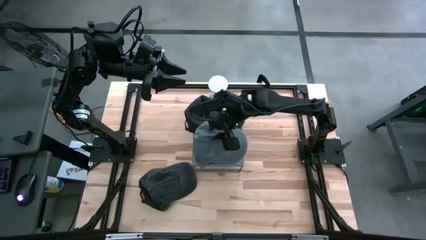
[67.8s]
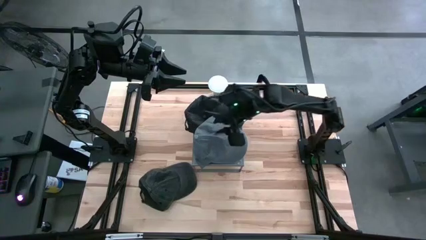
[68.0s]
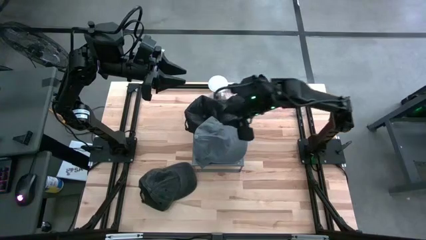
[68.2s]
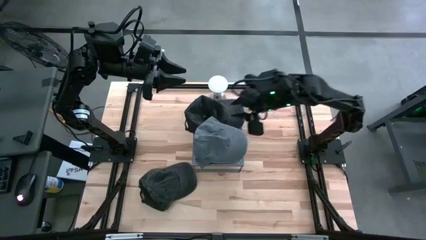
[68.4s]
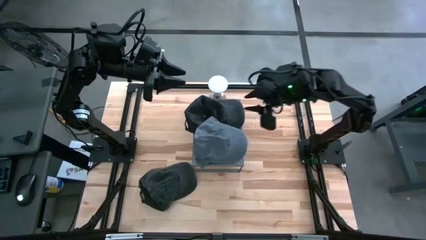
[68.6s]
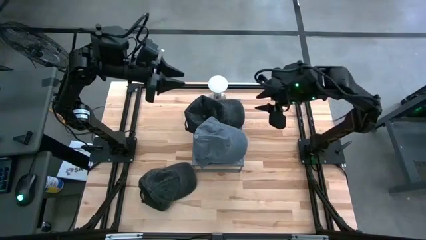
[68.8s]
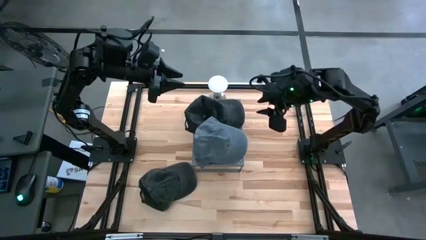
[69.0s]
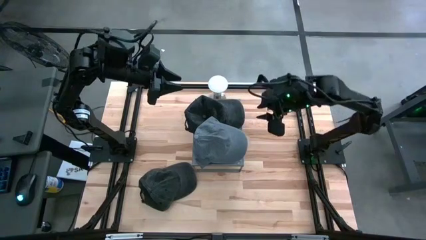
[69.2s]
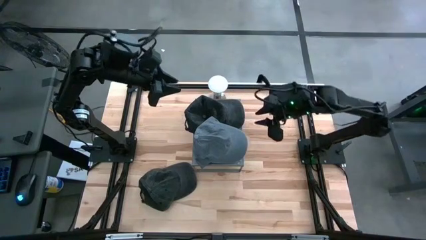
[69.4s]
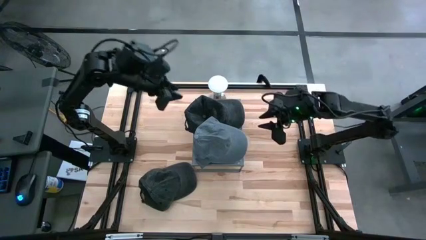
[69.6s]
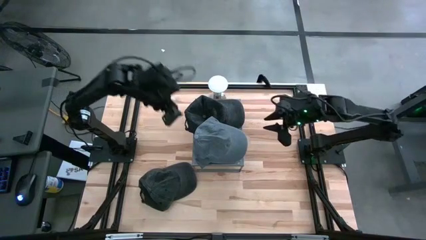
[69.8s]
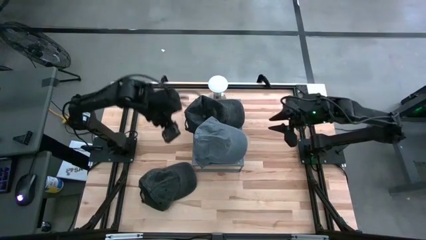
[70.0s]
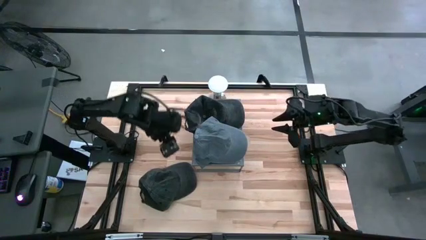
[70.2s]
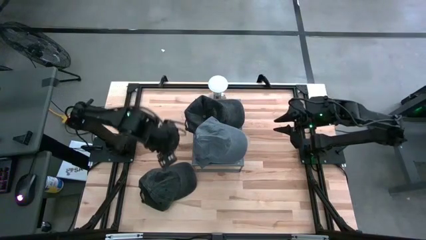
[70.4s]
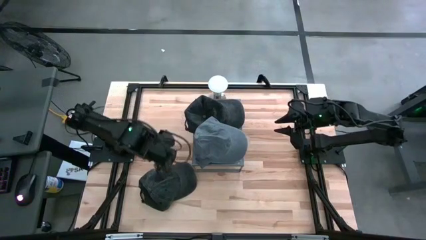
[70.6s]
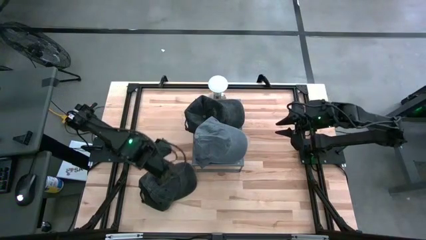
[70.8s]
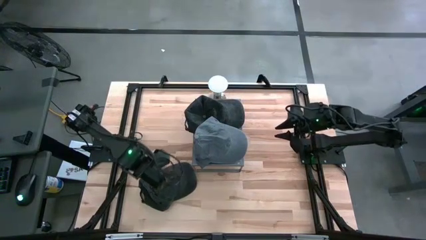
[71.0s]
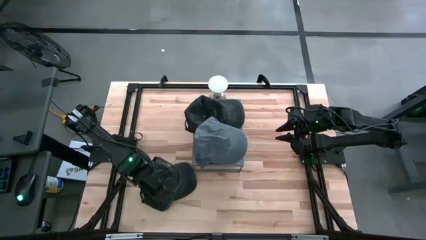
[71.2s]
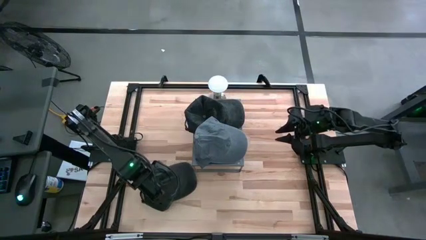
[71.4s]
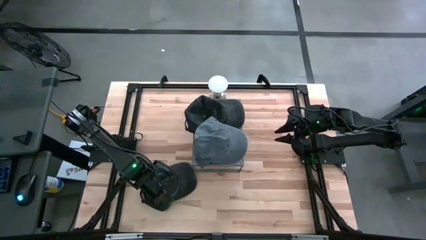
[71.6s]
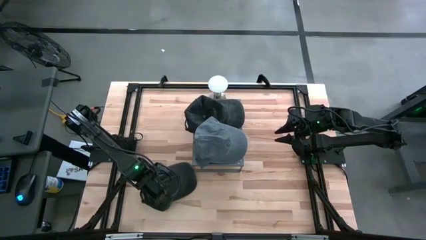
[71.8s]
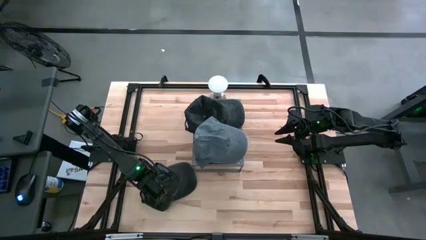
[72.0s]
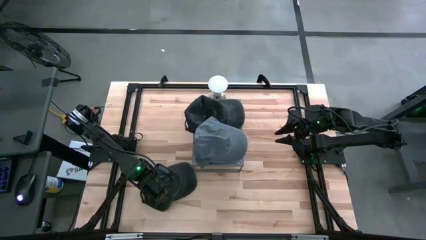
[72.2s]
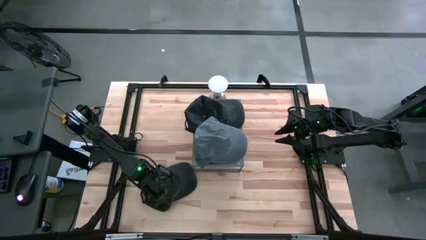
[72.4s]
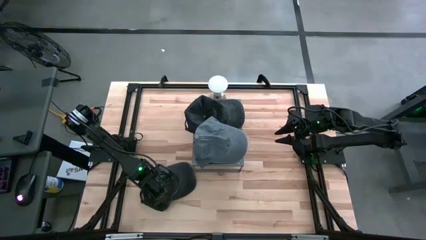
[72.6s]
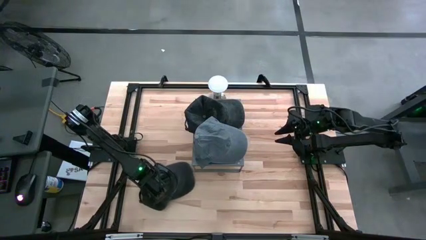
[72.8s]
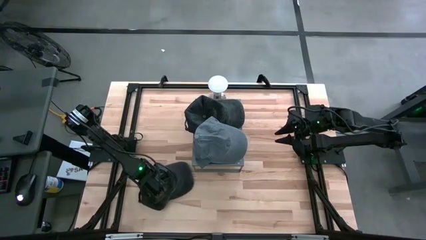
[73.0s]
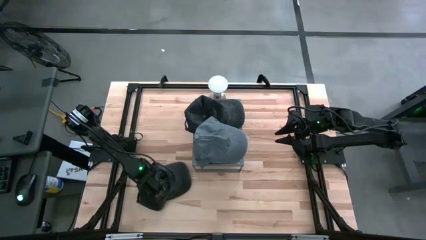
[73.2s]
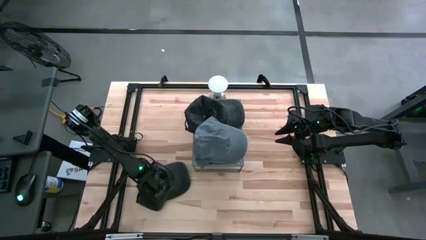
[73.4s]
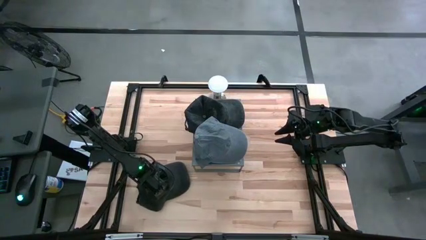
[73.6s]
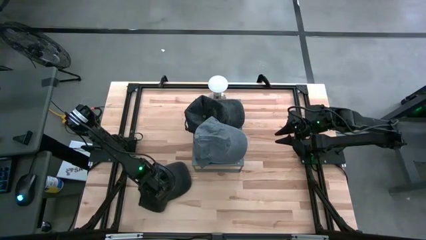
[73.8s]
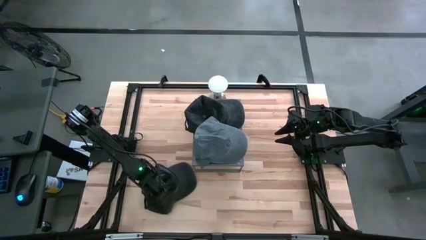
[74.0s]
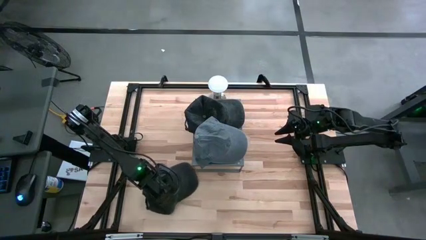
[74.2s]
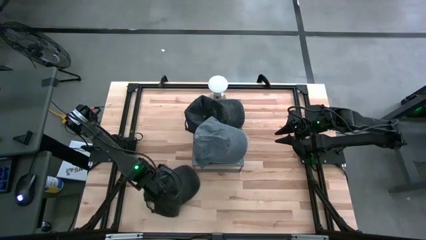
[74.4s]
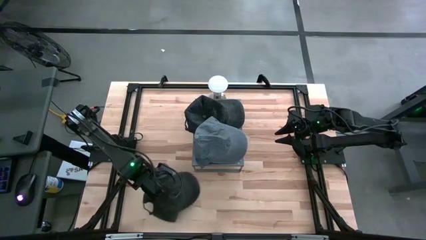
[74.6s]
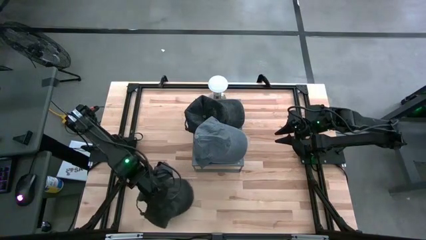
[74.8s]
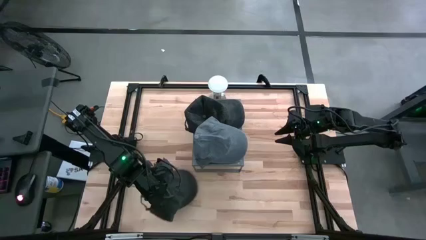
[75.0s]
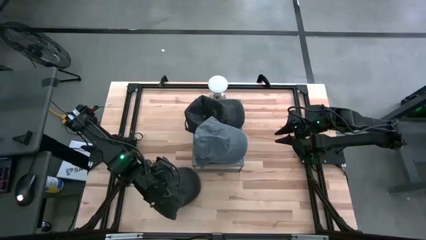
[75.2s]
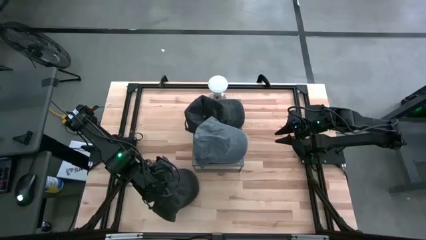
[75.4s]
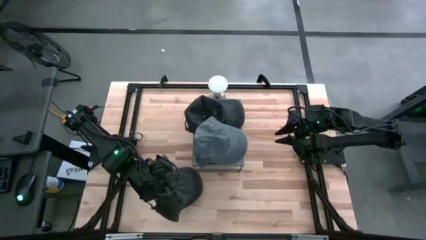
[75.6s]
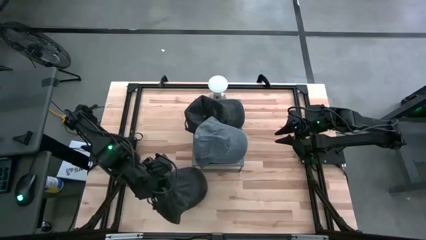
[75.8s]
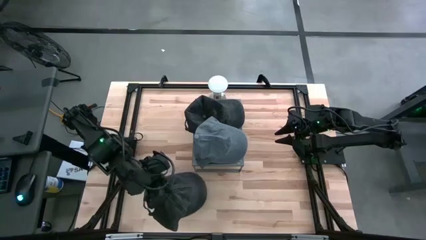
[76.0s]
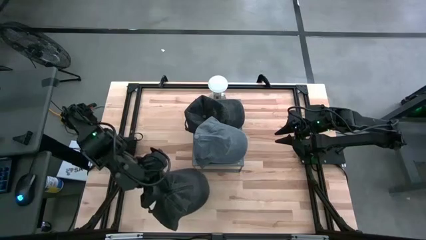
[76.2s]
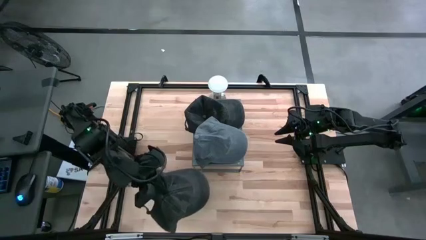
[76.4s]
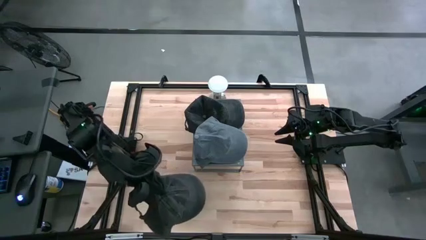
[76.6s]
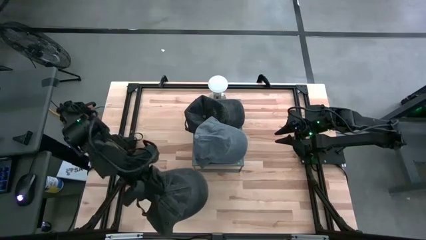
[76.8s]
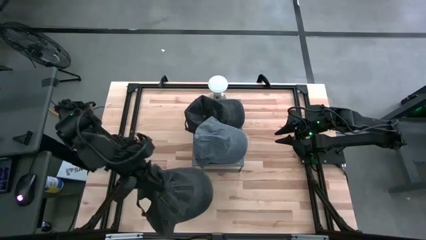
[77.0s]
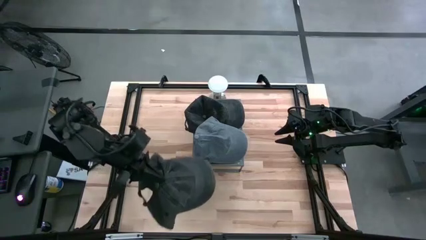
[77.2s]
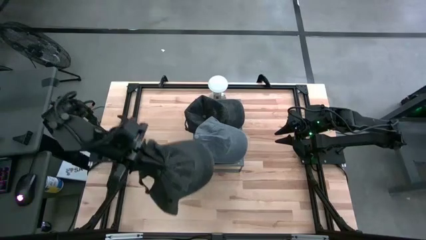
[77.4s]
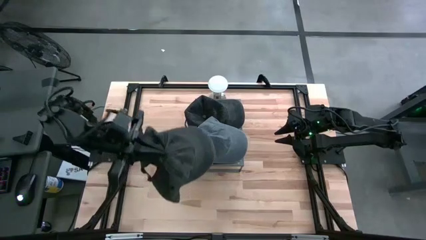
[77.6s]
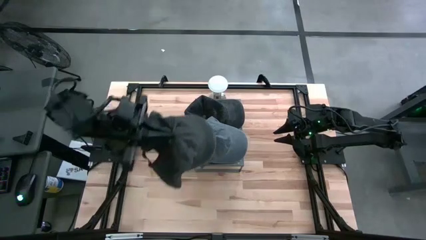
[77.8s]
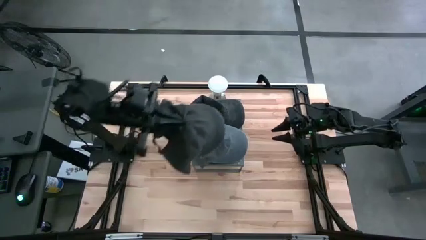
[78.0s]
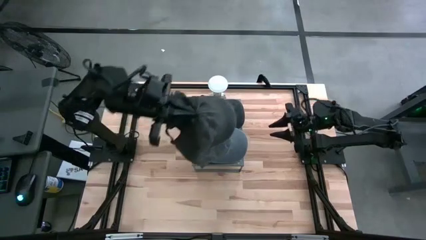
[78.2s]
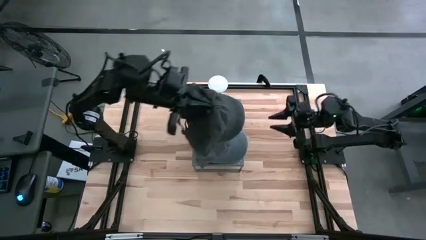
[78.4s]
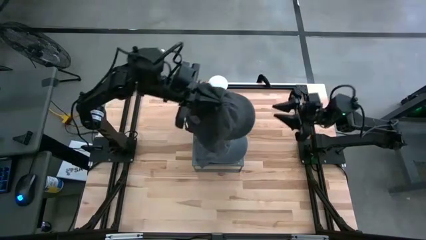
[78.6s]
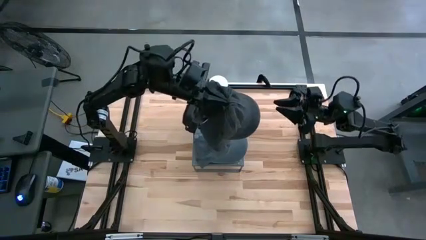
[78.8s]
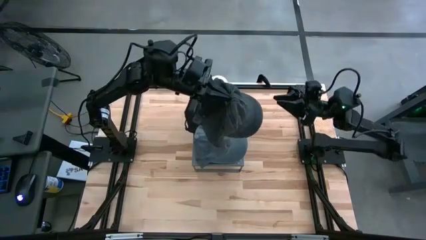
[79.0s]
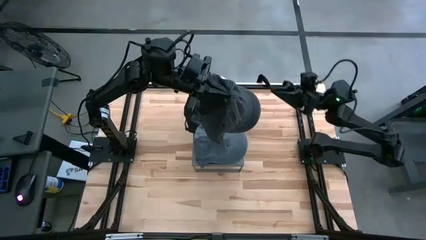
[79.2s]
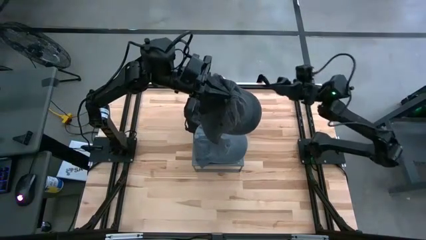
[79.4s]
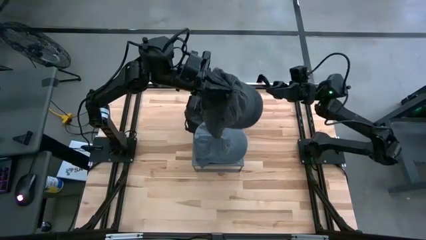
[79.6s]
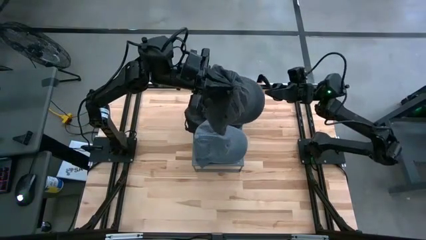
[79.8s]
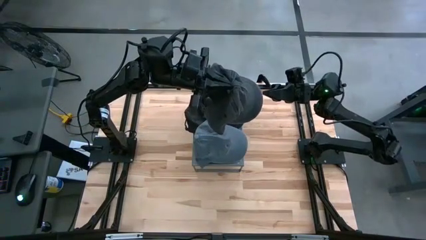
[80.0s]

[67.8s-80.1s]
Task: Pick & Place hat
Stack the black cap on the black cap on the shelf

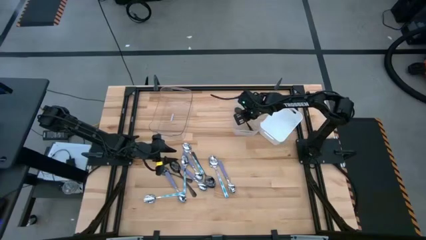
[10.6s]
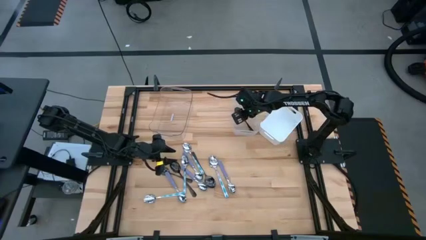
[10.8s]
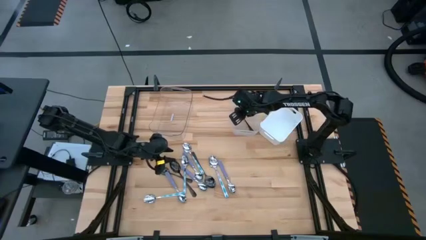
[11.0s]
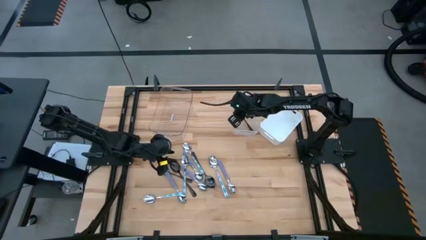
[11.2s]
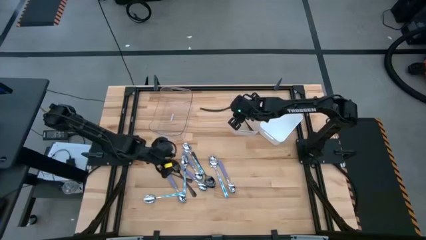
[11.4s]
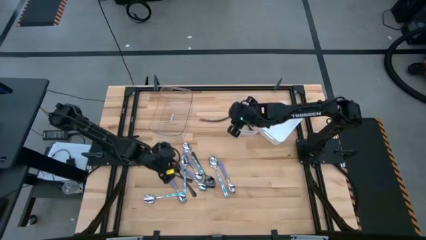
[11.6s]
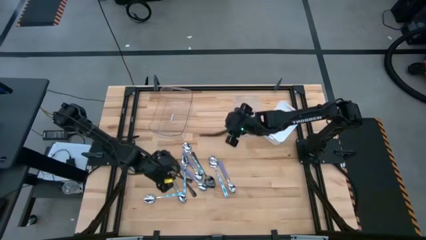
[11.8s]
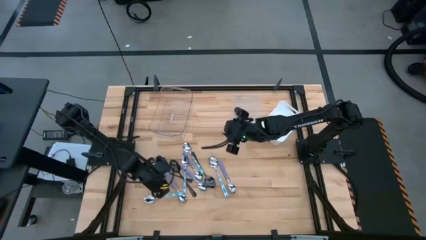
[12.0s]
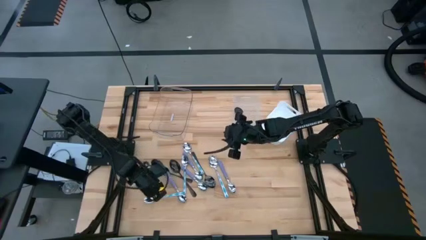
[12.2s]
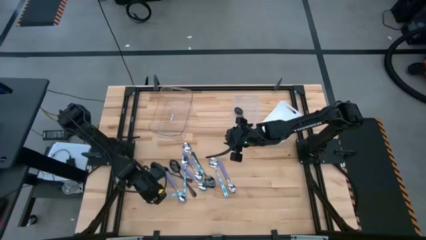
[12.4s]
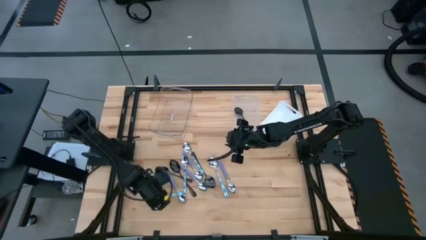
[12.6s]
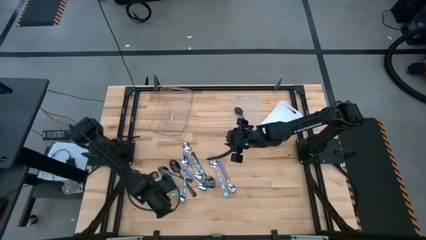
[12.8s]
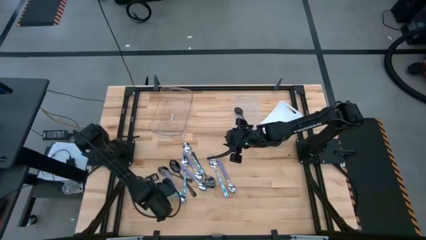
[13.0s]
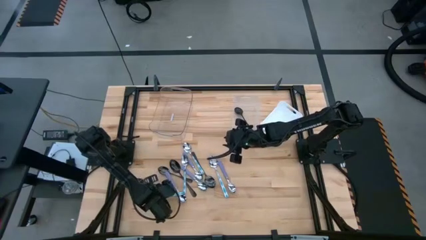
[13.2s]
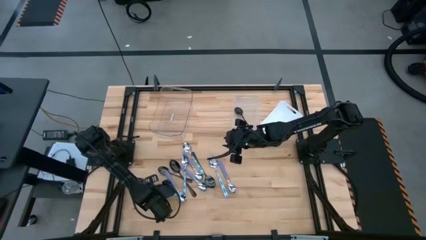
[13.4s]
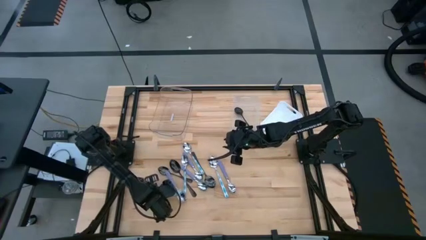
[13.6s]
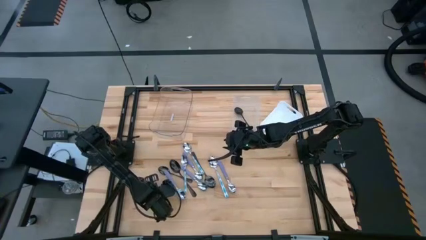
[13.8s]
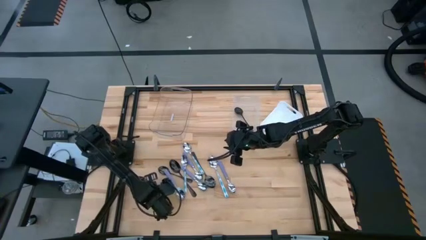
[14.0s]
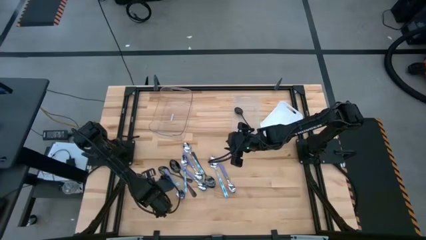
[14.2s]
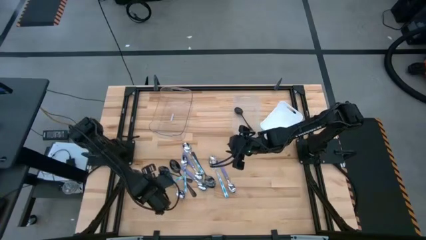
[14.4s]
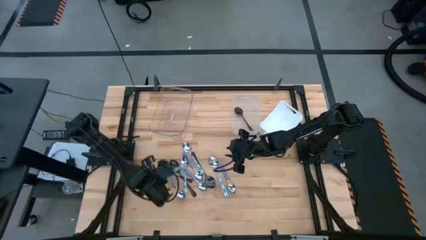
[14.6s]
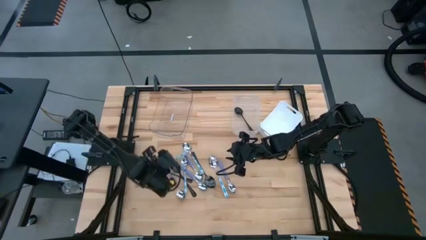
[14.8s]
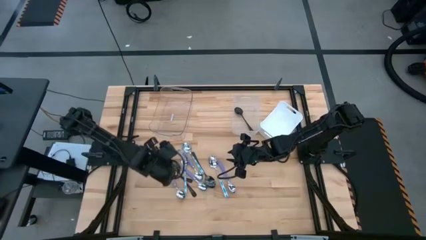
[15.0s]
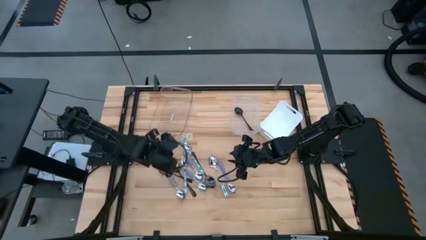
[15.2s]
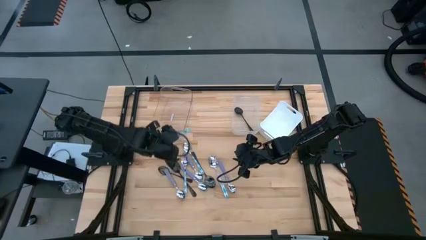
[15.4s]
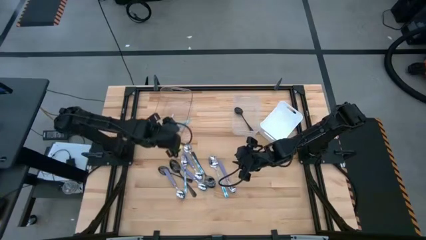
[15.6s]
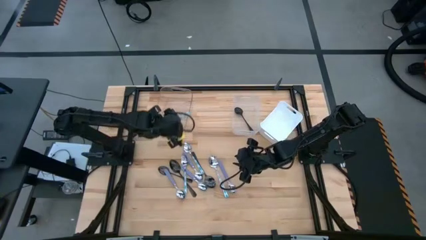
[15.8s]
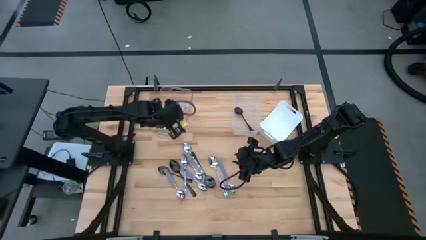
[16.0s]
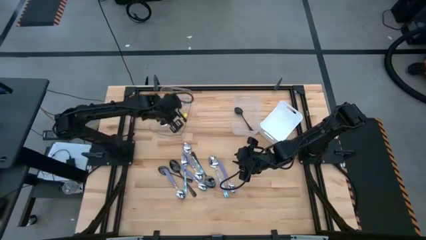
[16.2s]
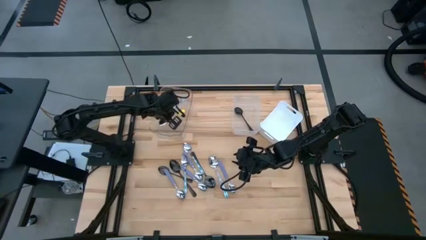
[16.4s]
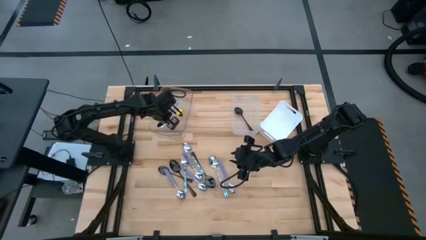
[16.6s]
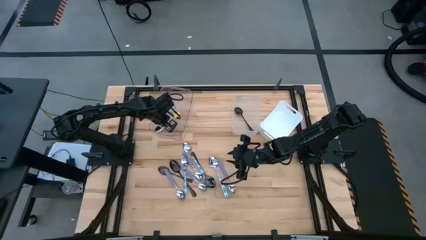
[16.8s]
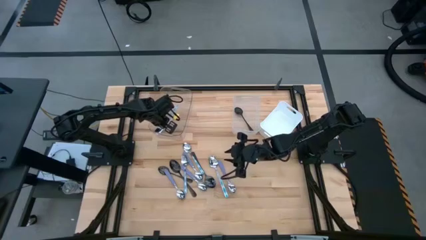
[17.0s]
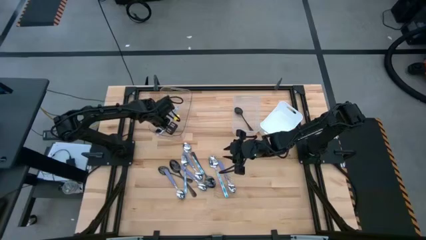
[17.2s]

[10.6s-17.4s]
Task: Sort silverware by color (type)
Put the green pattern spoon into the transparent bin
